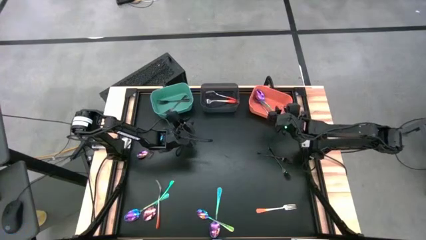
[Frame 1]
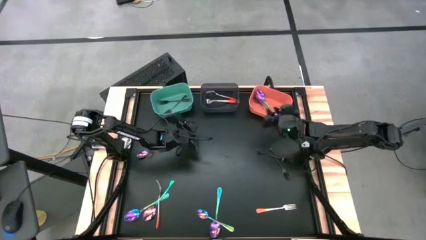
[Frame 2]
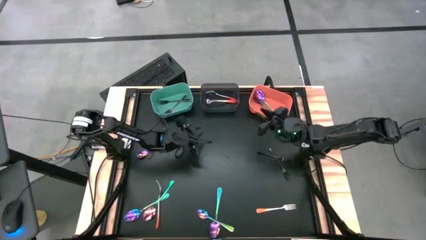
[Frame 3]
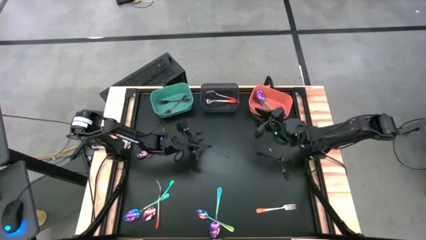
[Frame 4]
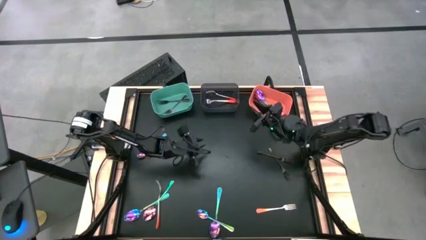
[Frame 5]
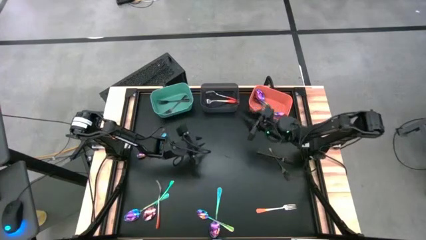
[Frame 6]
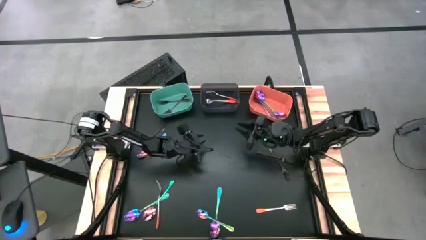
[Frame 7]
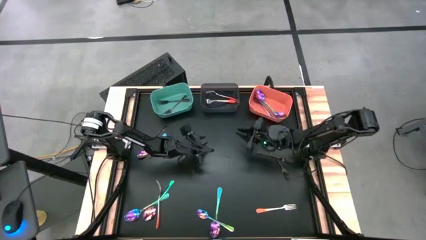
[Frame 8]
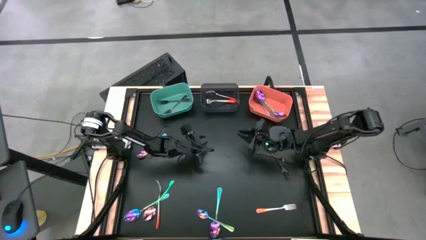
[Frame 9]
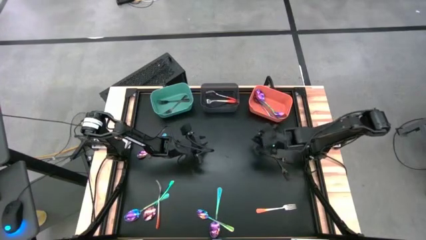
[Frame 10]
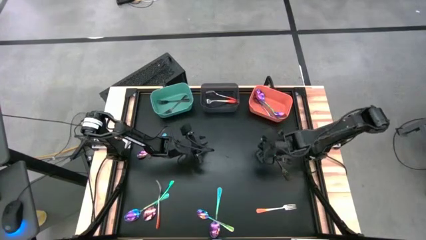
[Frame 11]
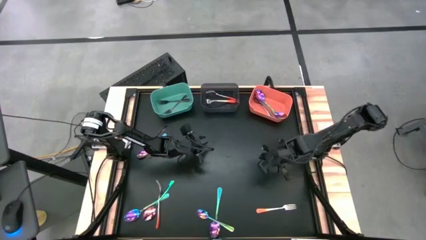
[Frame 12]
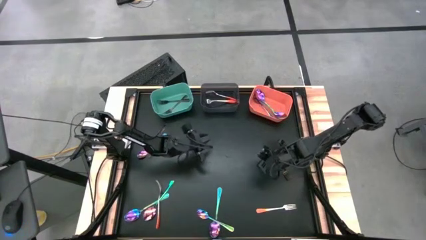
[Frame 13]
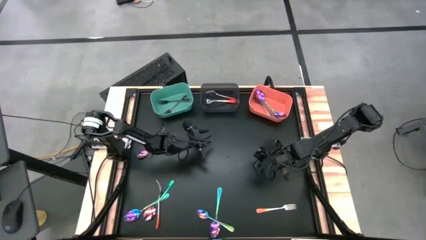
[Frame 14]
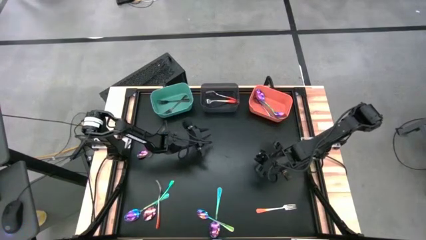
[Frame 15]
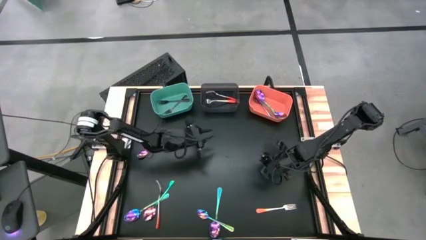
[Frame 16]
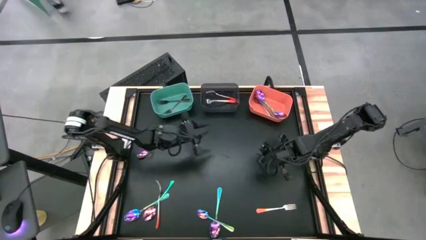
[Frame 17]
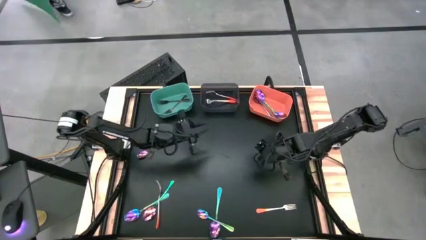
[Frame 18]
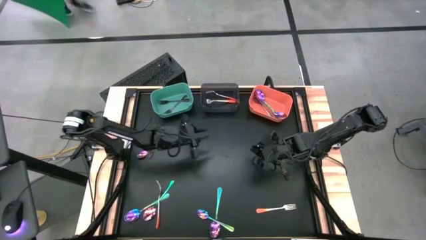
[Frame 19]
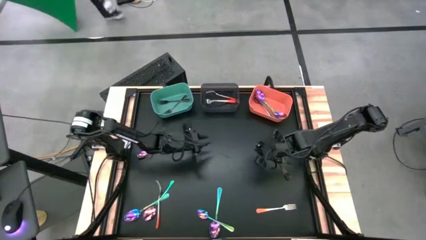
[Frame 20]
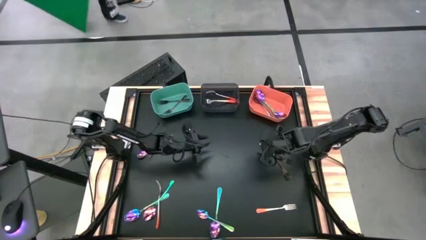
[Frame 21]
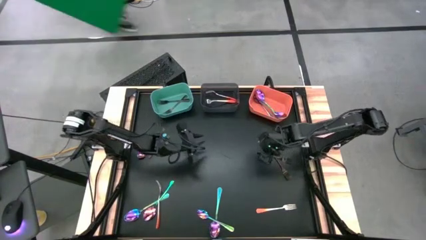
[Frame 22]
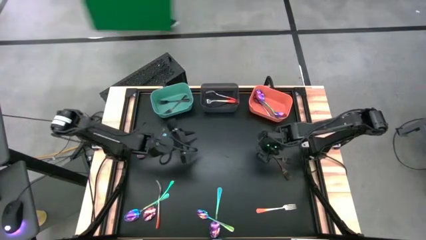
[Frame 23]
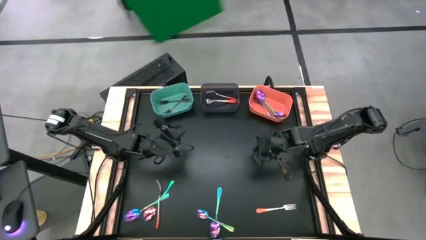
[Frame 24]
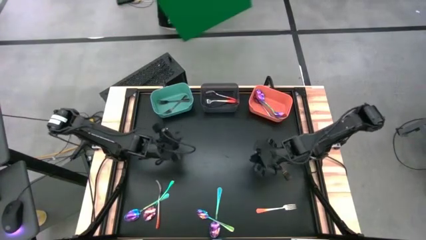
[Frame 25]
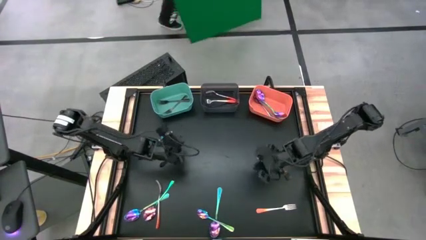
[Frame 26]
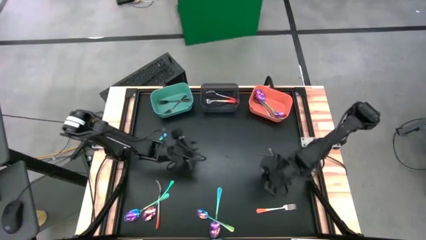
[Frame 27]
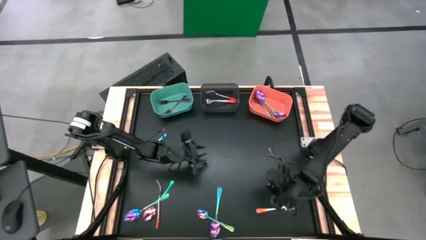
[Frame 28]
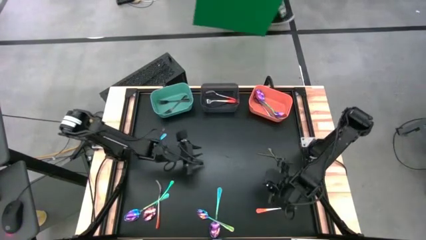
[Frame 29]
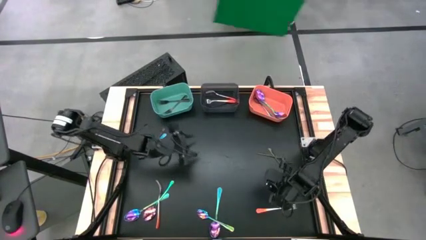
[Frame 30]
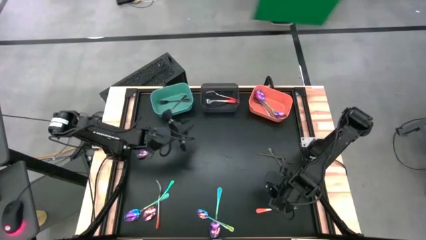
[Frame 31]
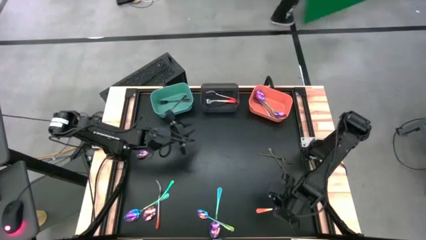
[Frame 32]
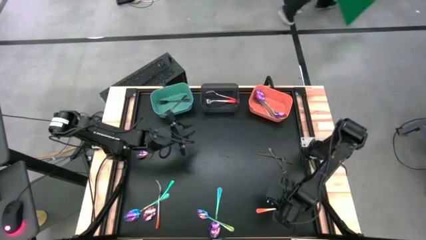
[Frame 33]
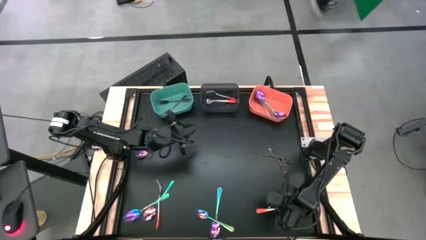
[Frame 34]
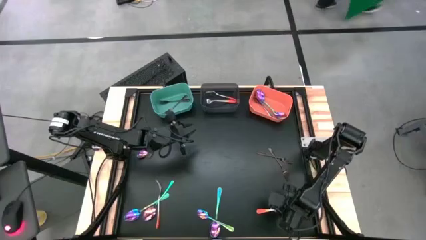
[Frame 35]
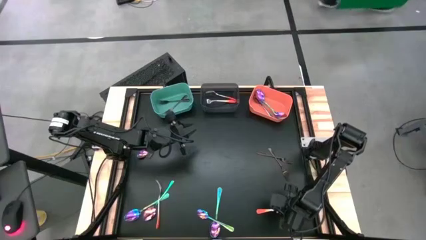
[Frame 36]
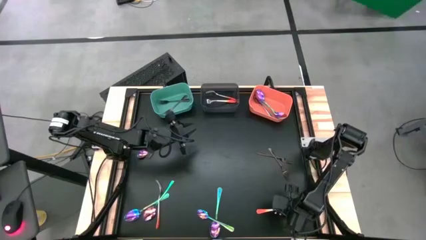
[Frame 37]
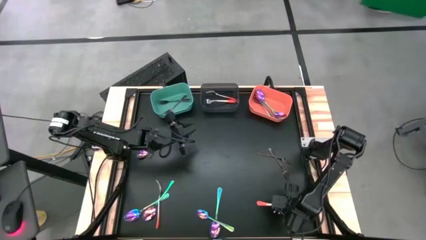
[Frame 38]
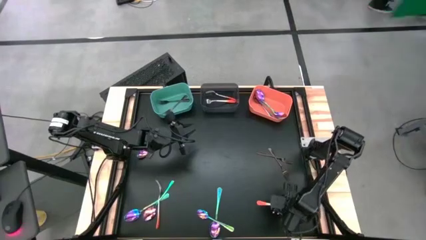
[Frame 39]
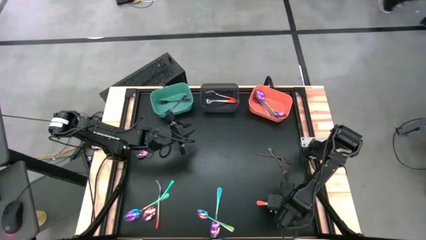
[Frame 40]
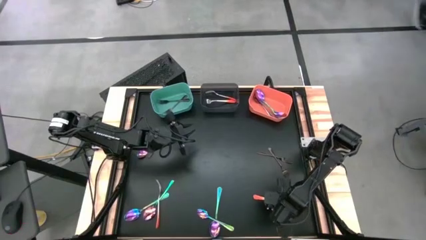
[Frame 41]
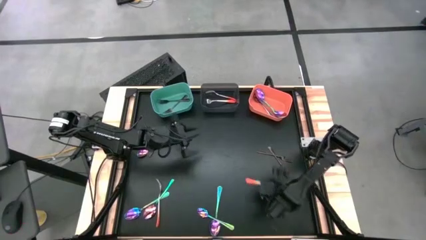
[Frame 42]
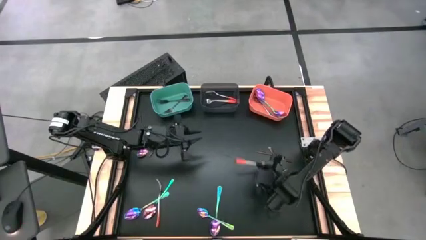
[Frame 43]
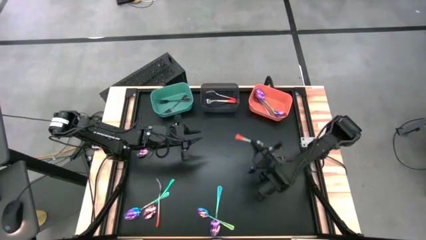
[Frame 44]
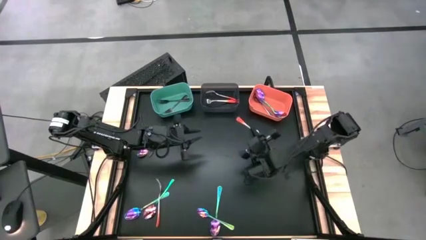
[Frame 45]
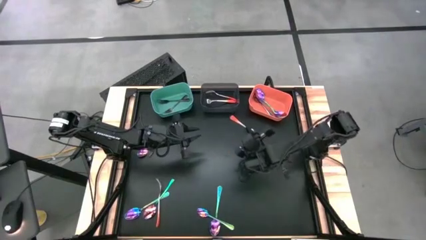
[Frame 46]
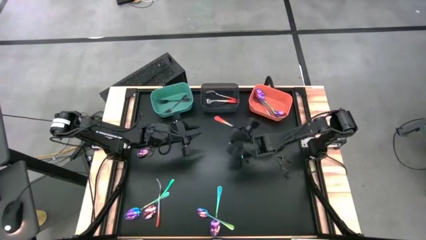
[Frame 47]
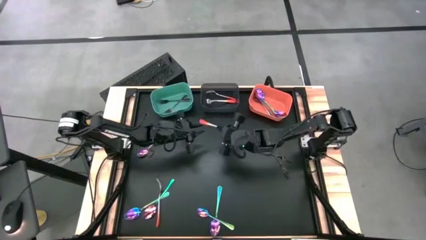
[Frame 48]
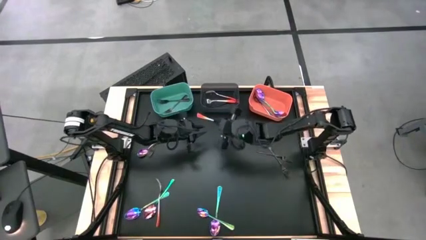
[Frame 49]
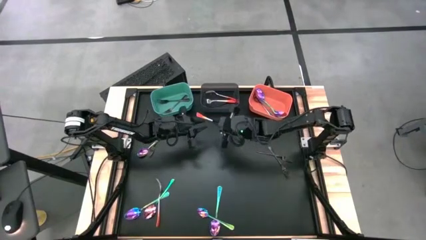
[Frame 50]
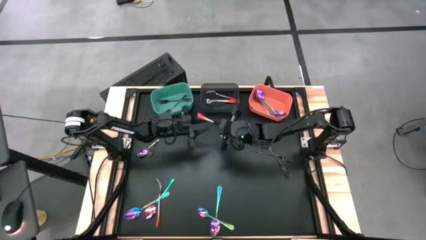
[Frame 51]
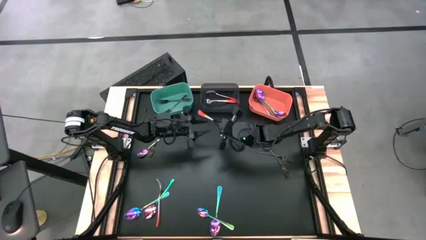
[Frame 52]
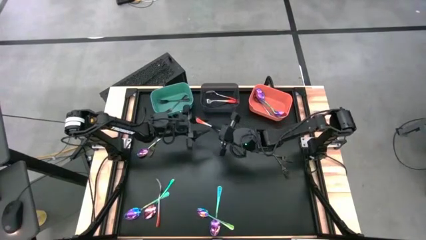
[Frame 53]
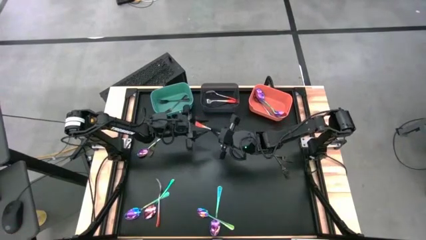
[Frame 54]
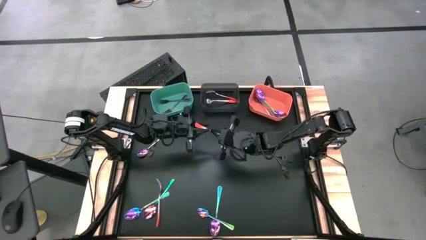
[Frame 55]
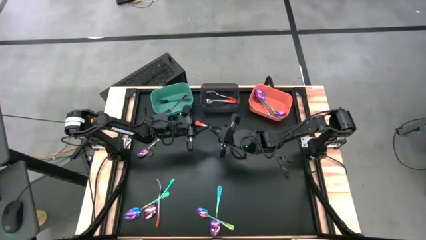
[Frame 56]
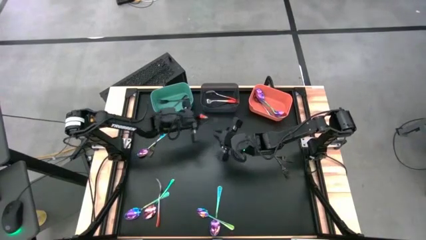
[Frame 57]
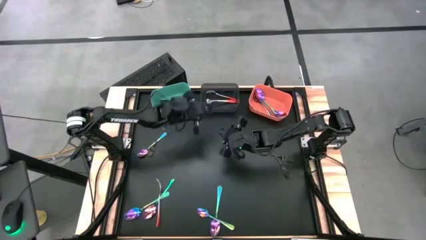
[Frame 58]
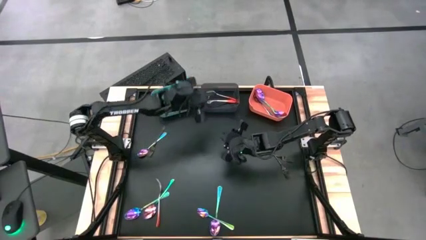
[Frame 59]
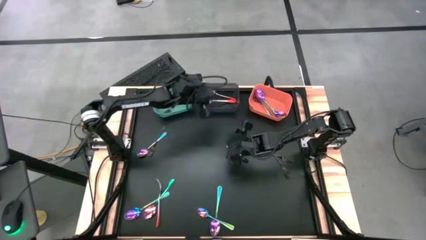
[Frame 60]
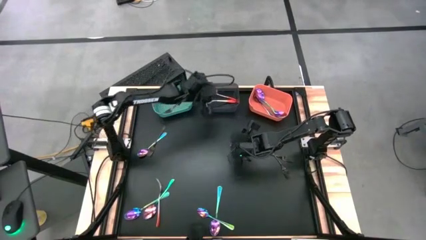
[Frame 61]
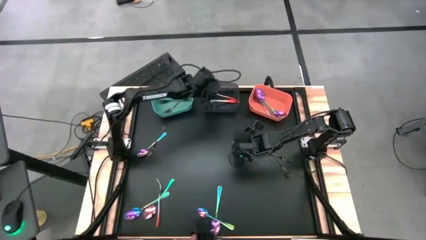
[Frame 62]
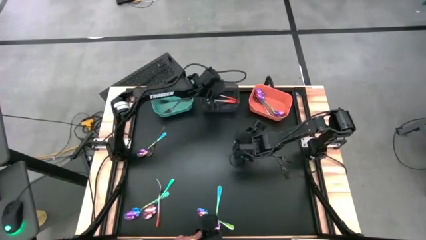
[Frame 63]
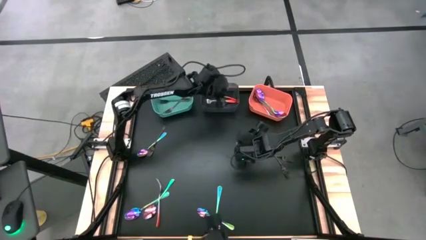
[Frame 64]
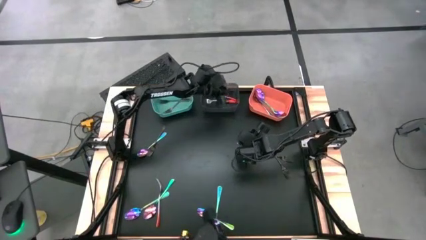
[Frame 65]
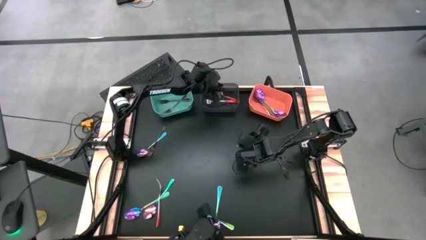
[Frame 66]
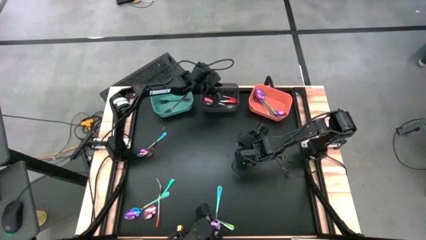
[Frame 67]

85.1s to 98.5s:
Task: Sort silverware by color (type)
Put the orange fork into the black bin

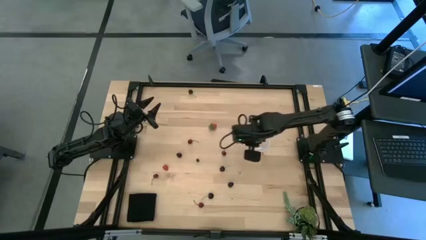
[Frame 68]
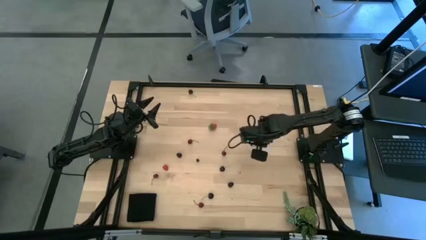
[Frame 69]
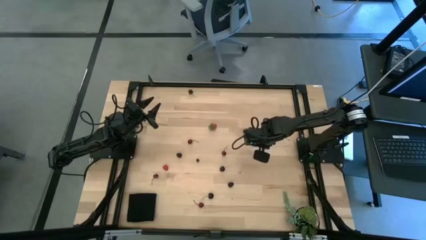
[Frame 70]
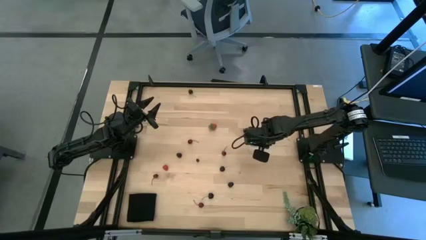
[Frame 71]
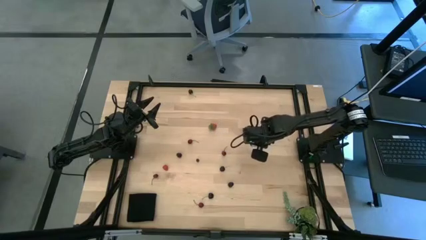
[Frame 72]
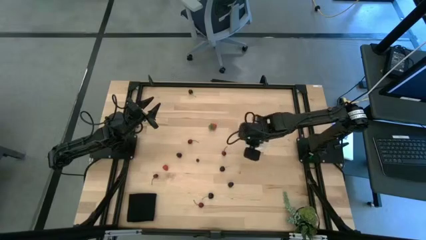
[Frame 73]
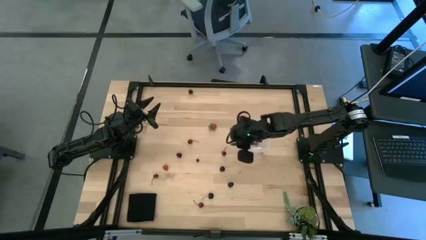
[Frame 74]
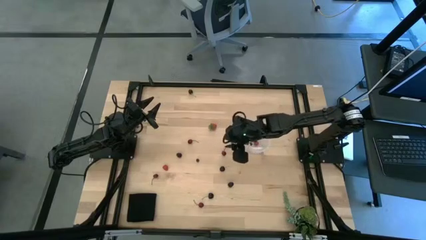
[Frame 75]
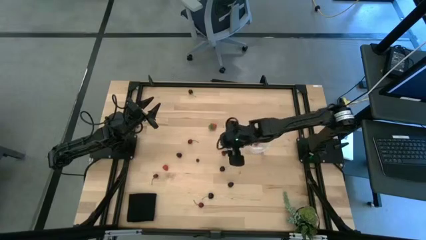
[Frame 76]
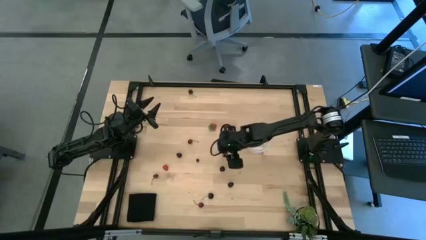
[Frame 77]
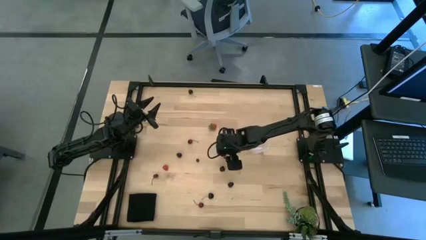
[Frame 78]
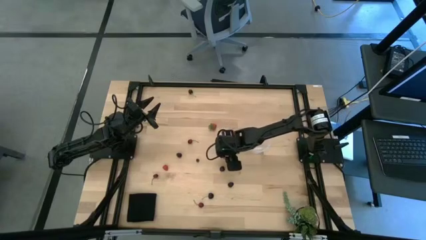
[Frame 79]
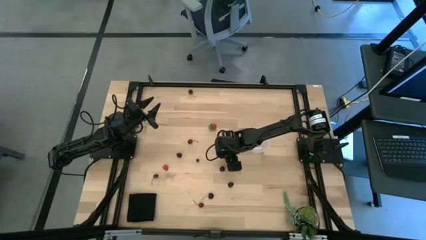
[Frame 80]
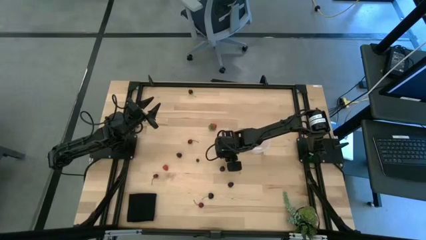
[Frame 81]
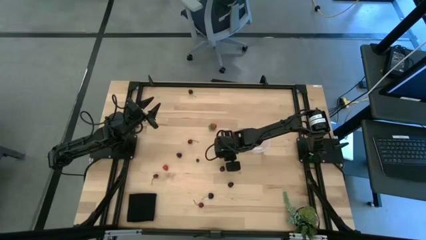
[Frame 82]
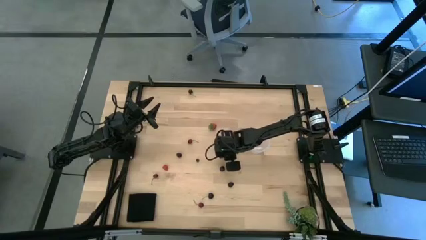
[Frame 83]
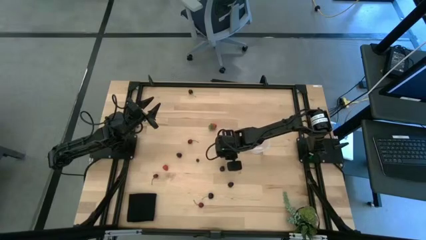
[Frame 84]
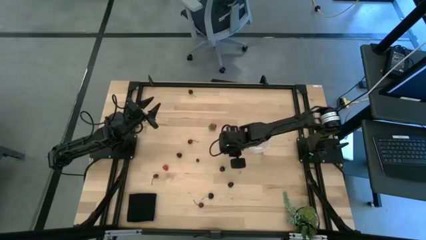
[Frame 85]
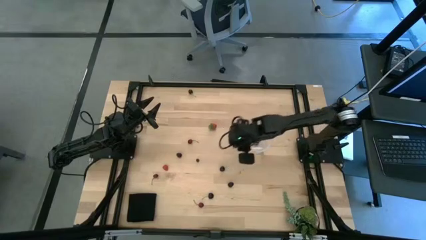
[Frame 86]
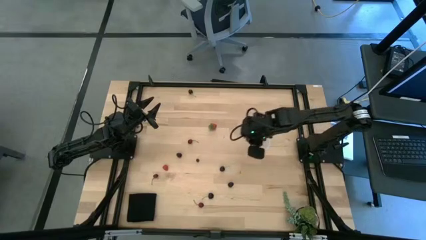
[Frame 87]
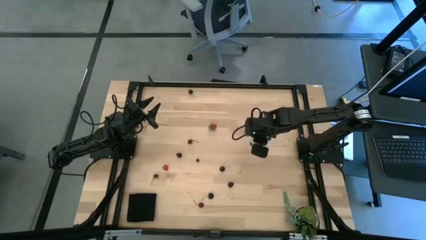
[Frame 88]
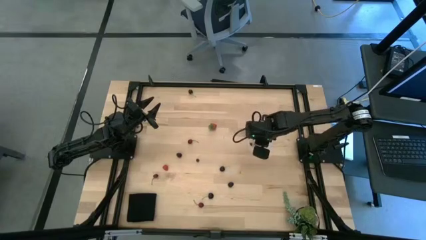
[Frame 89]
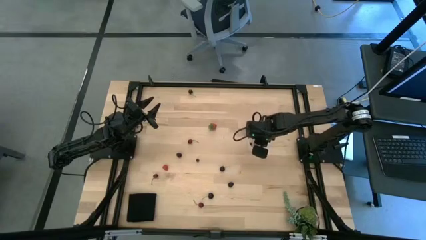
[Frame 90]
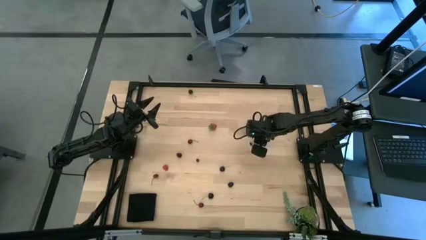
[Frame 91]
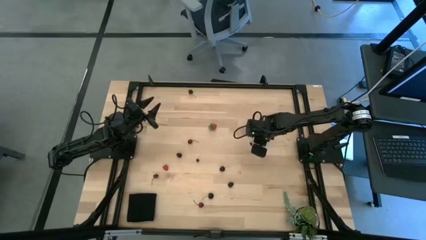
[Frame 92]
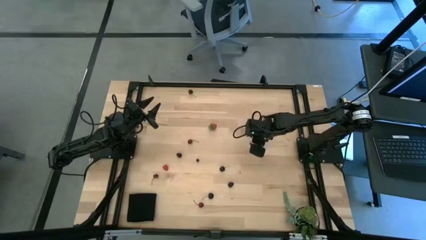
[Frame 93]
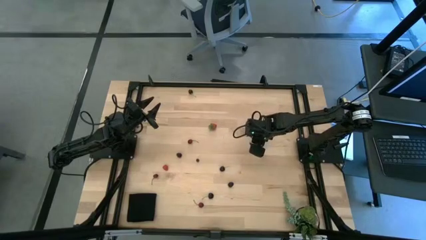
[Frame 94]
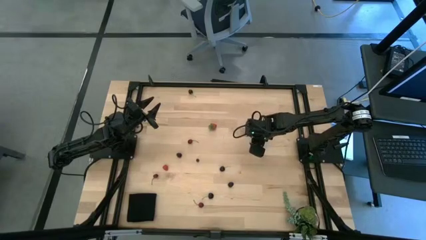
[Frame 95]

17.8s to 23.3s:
Task: Pick and placing Produce into tupperware
Put the red cherry into the transparent bucket
